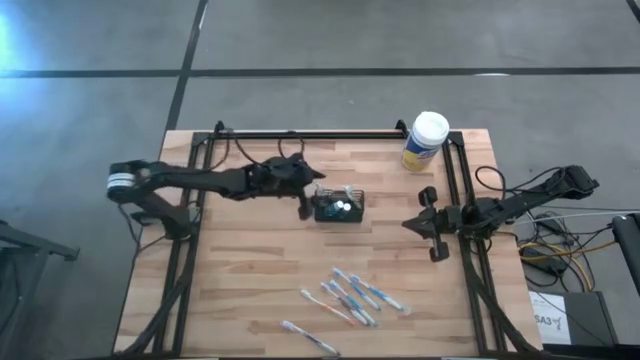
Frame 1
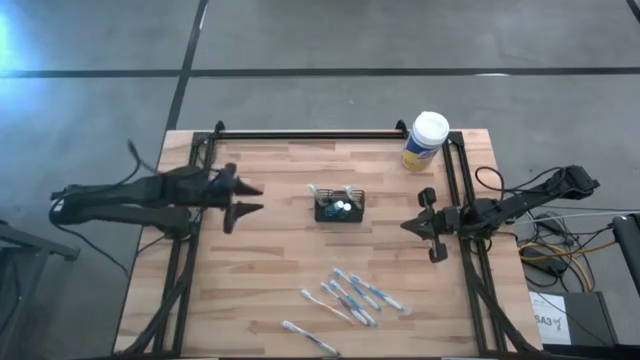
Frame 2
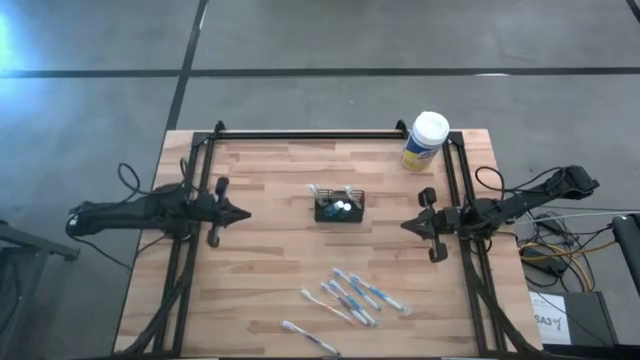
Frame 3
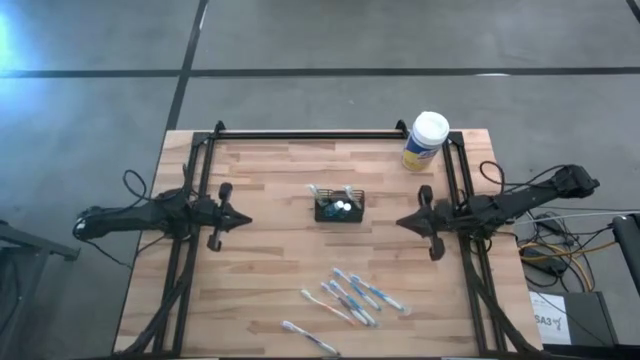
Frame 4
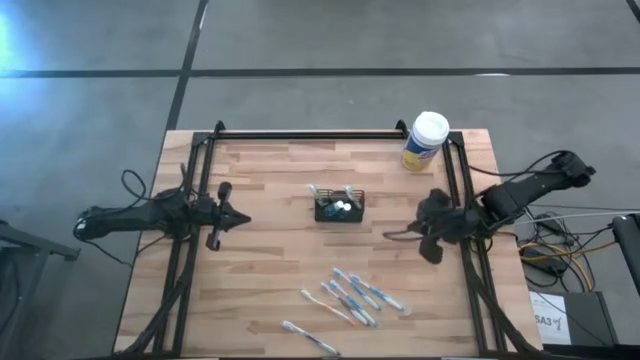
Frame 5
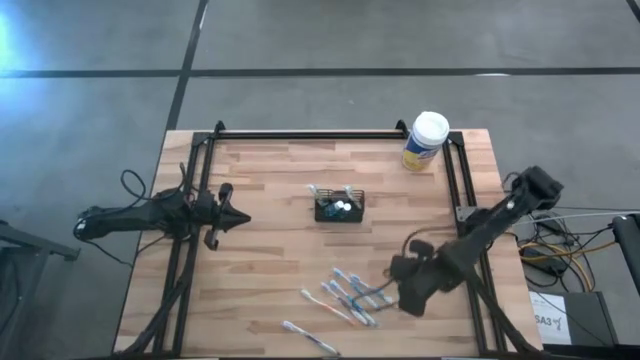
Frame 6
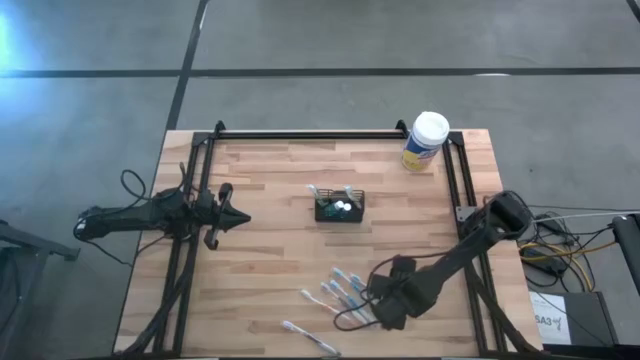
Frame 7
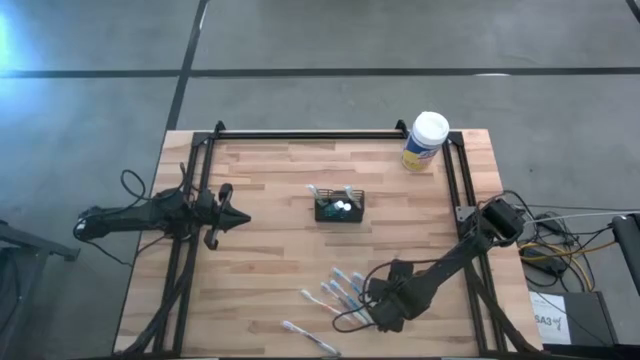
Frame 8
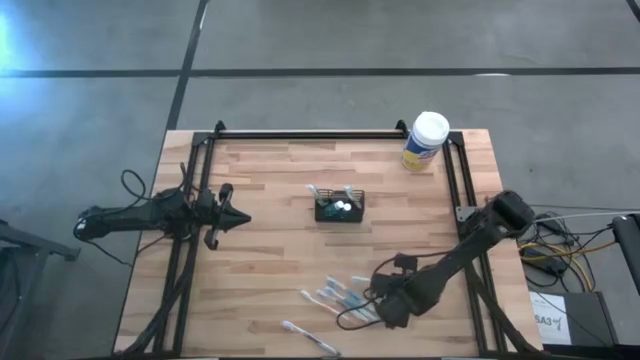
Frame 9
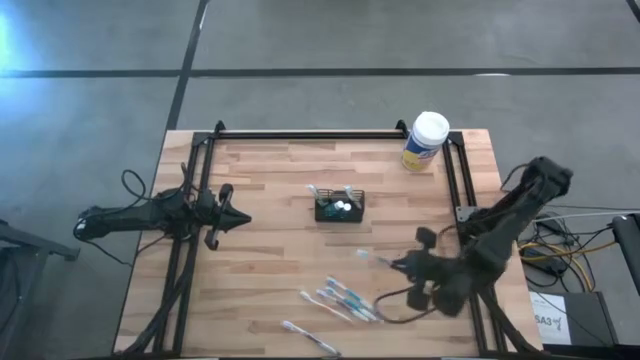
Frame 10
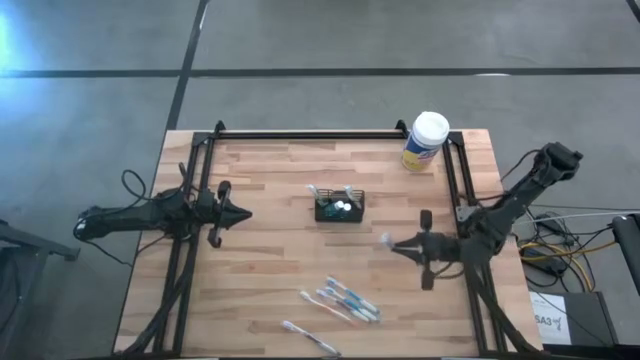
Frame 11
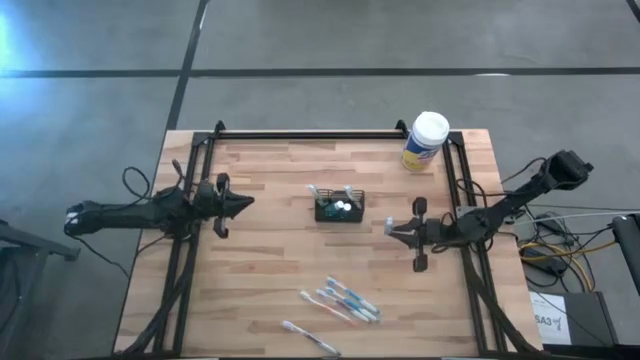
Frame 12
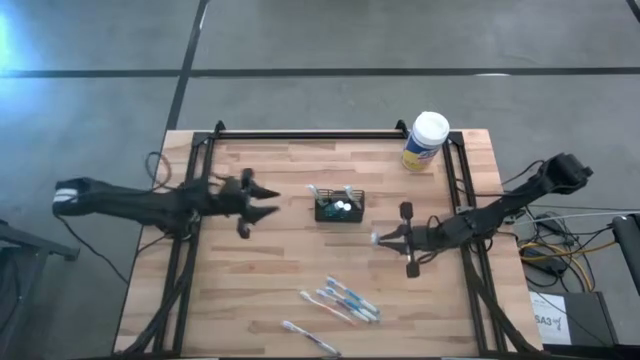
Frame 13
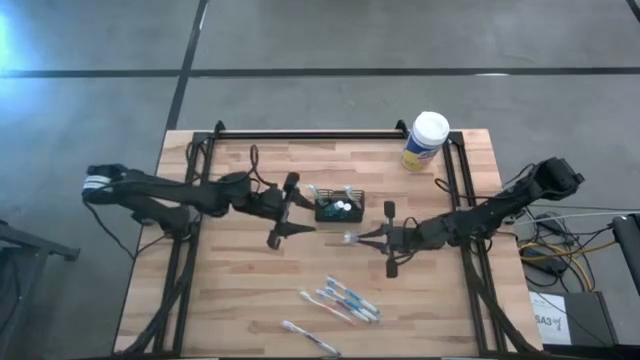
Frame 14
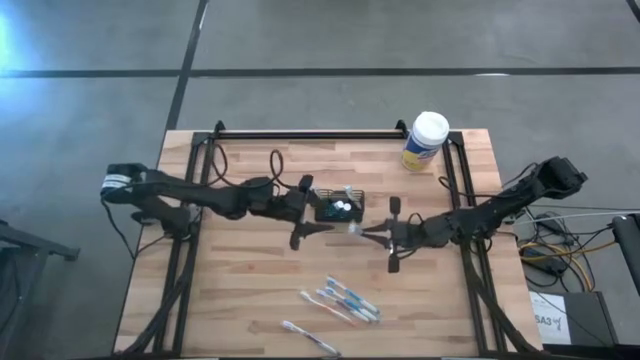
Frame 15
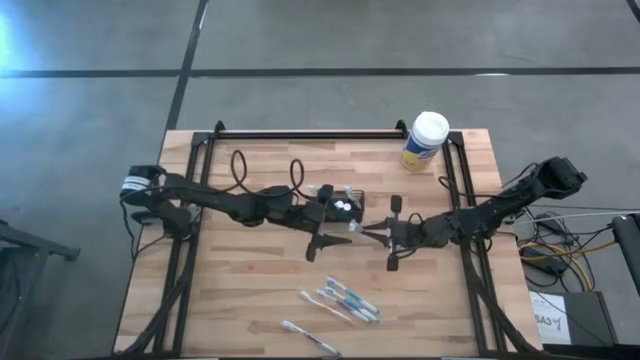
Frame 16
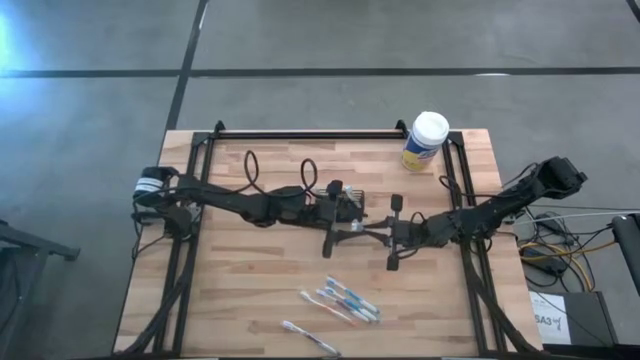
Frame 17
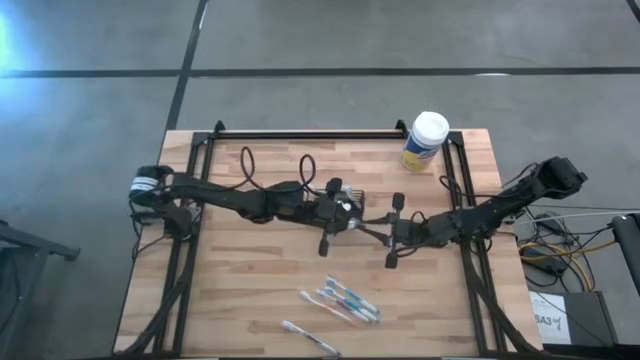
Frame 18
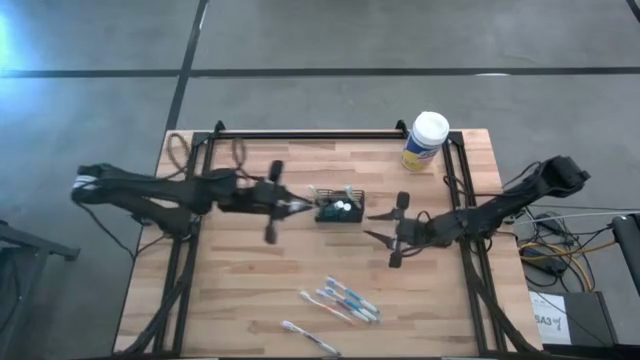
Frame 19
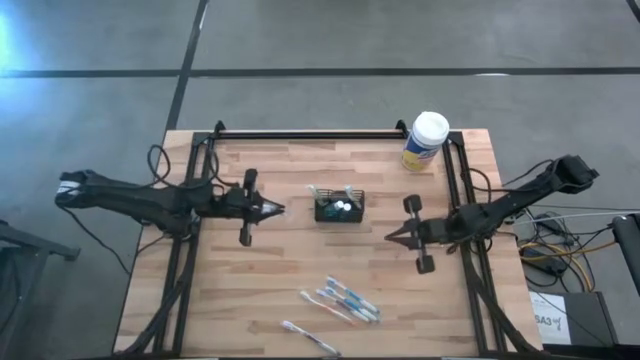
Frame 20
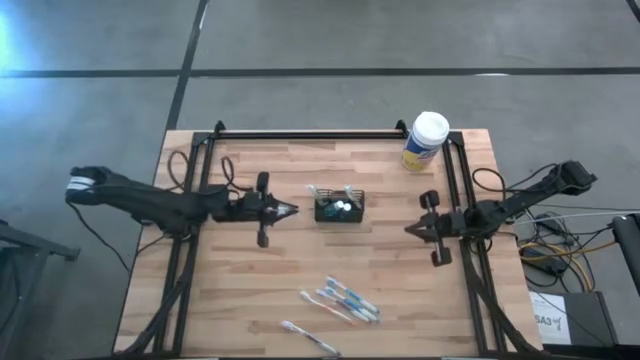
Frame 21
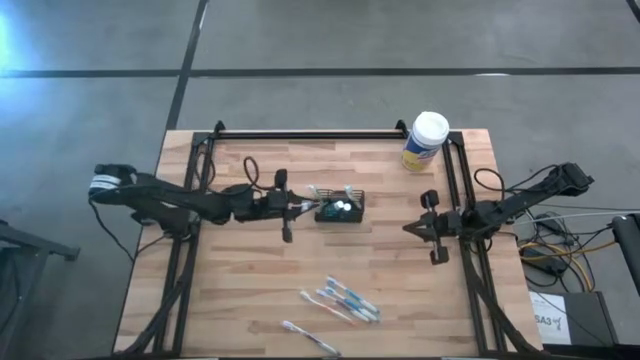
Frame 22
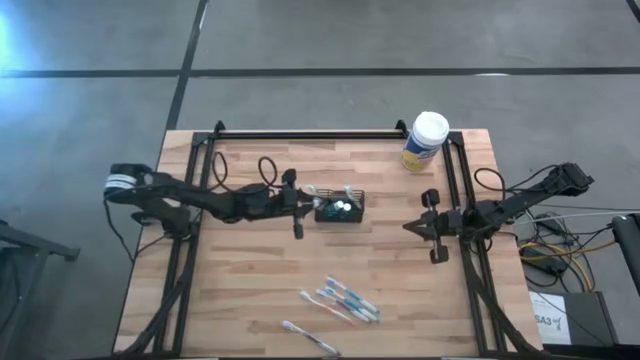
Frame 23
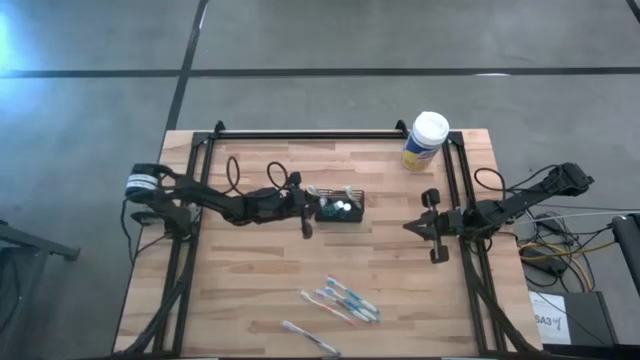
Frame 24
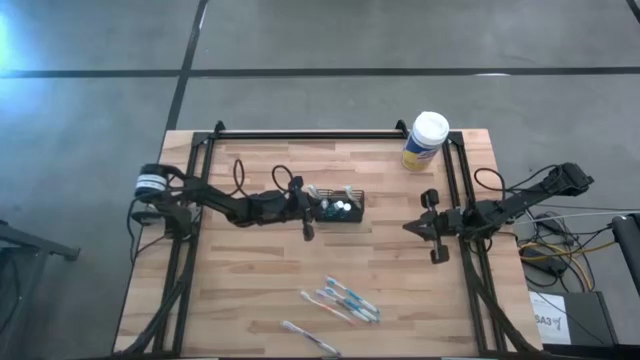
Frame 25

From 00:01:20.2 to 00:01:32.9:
Task: Pick & Place toothbrushing station
Put the right blue toothbrush into the black wire organizer

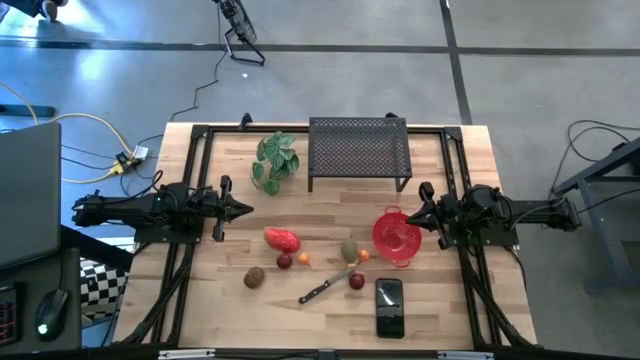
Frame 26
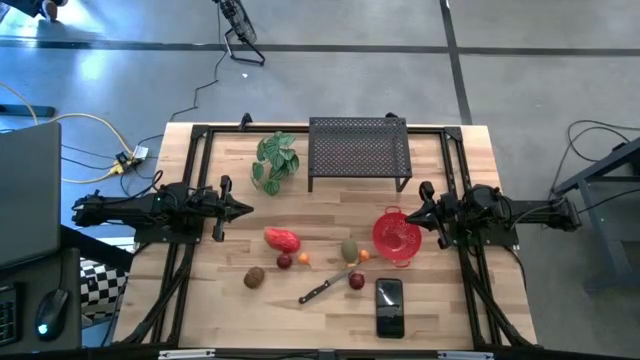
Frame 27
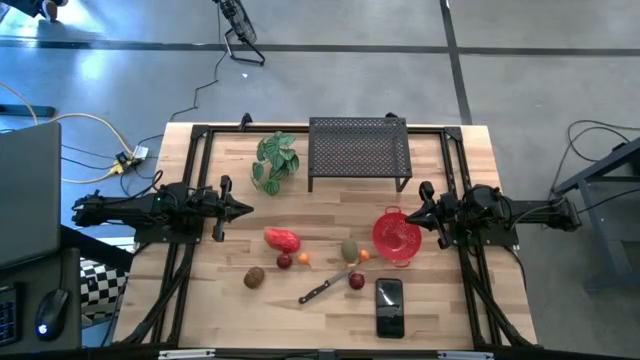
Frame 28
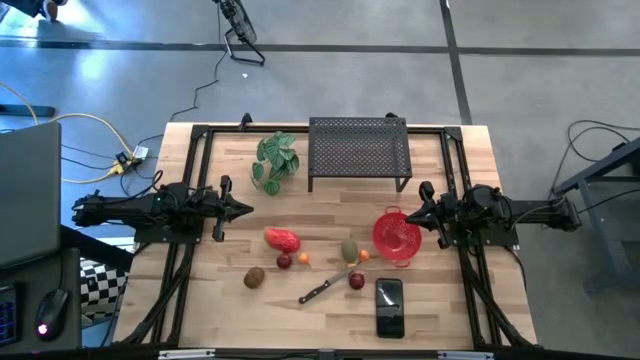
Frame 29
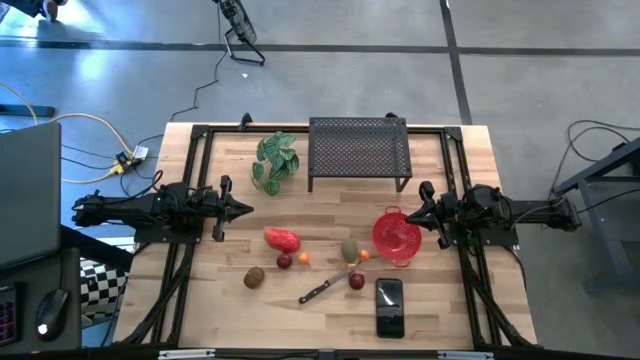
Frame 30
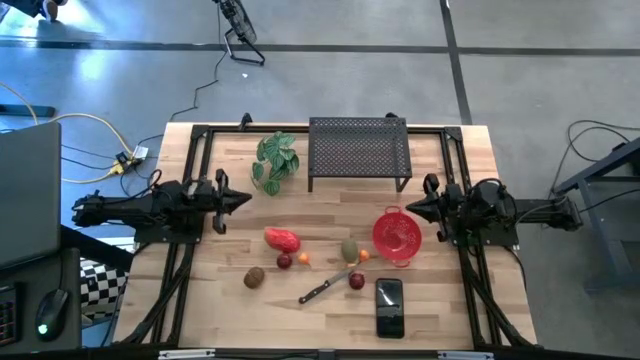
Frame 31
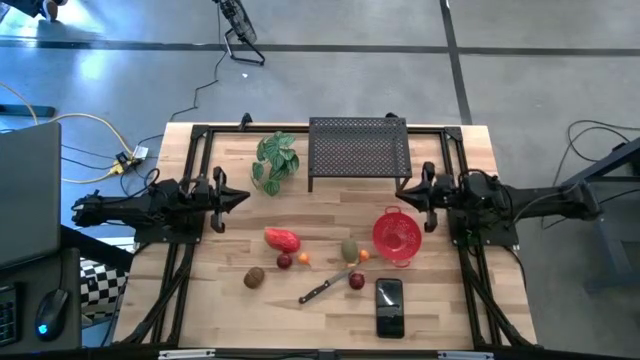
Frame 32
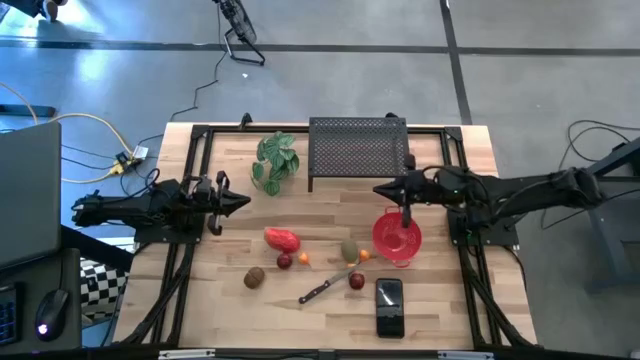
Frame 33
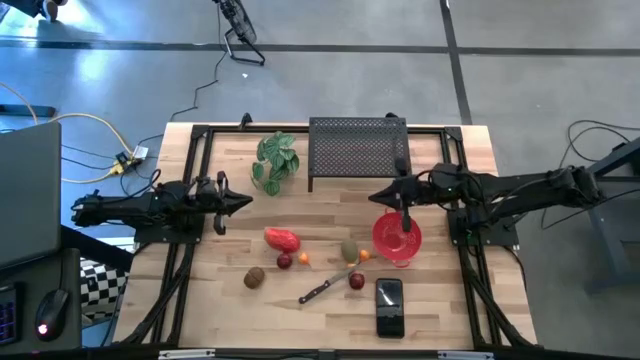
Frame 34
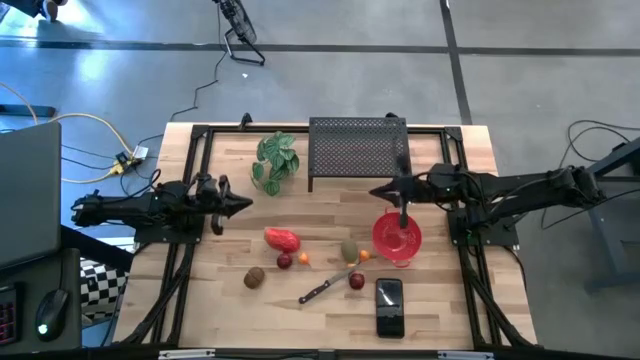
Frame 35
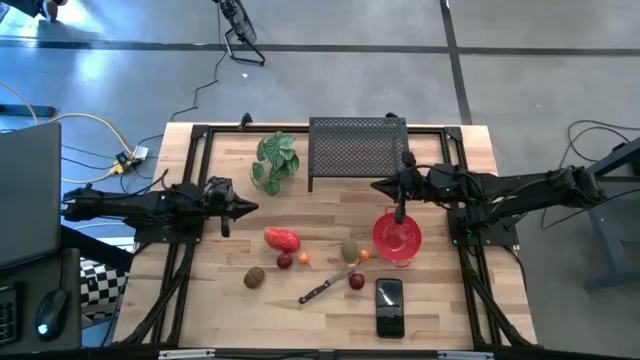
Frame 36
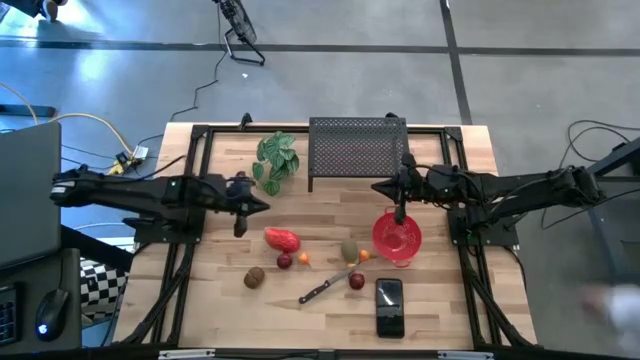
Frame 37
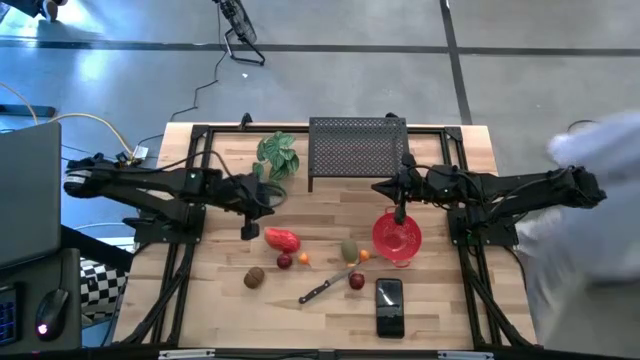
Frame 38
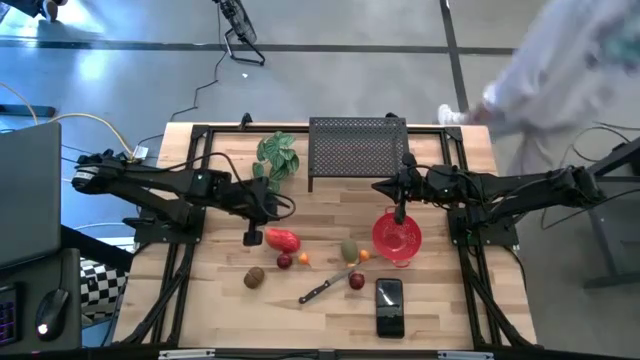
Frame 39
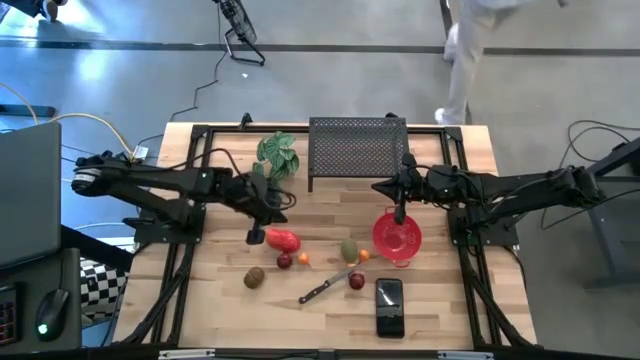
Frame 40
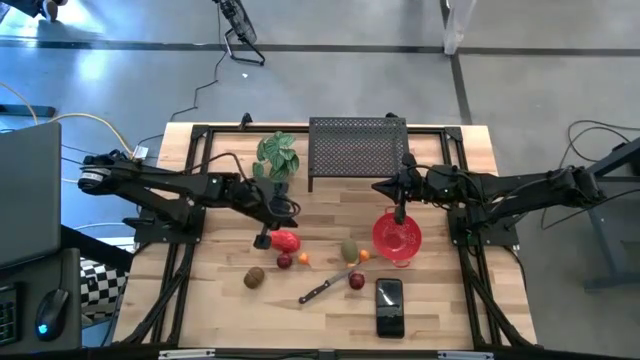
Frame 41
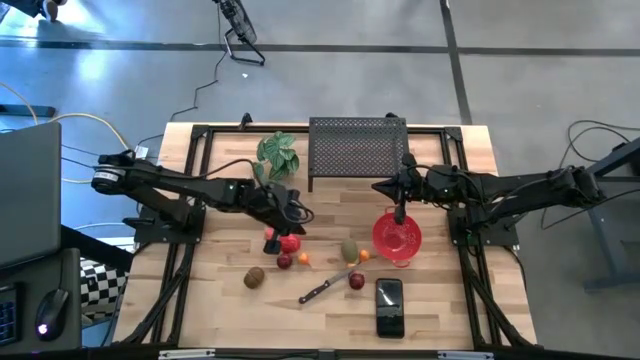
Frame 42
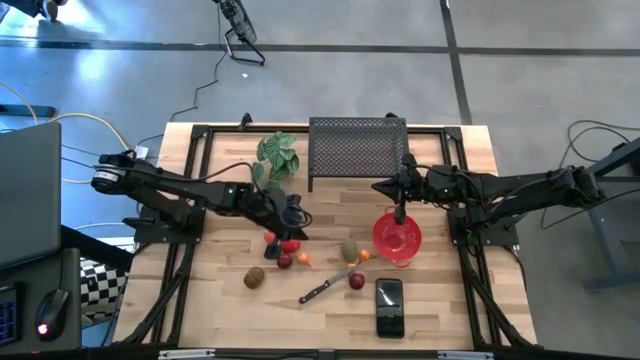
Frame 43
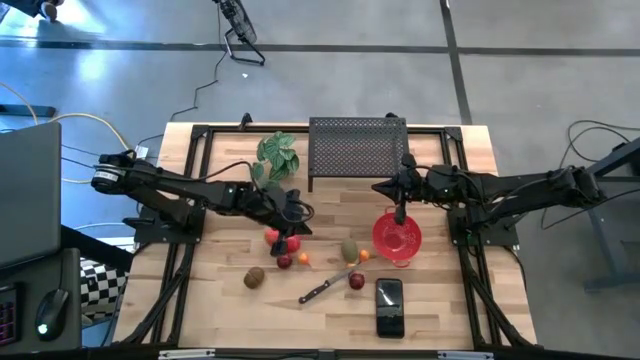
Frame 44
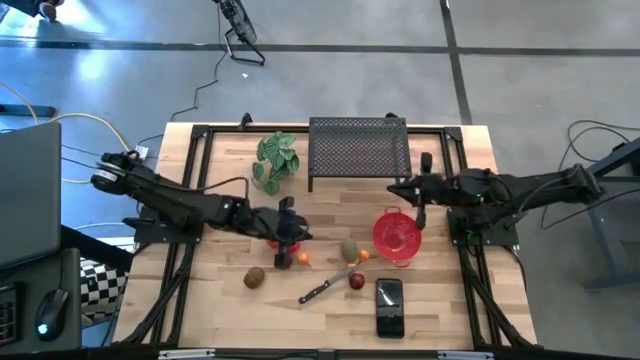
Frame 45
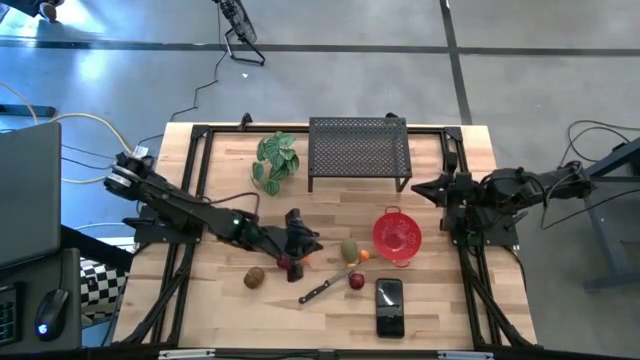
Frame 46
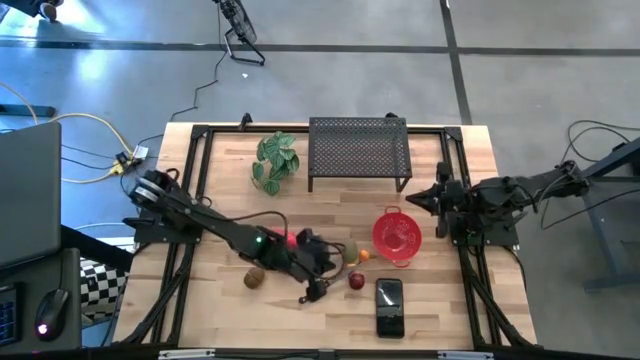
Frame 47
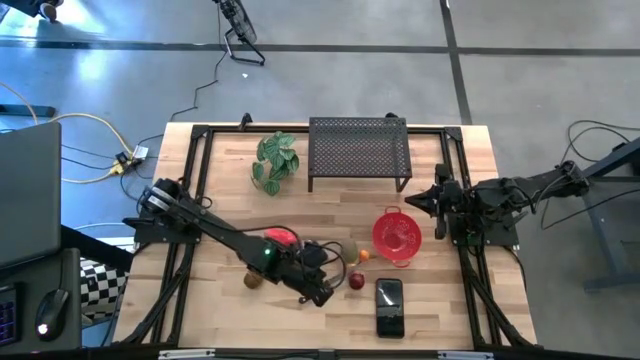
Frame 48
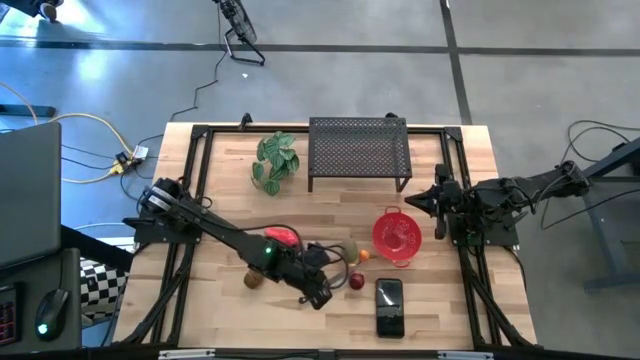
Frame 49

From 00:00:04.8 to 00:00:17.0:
Task: Pick & Place Fruit
Put the black knife on the shelf
